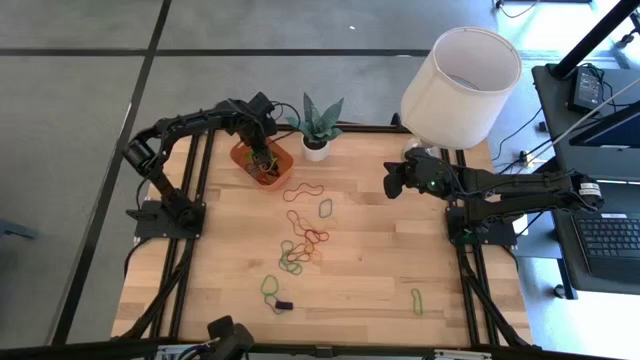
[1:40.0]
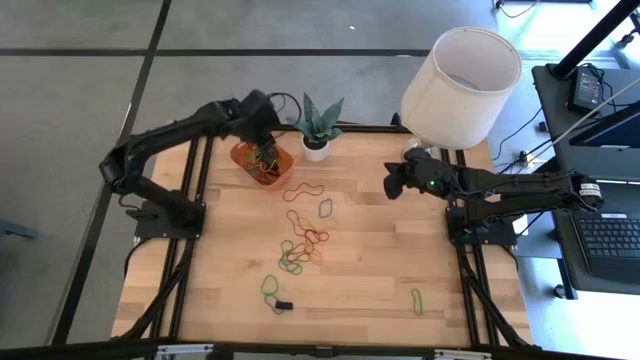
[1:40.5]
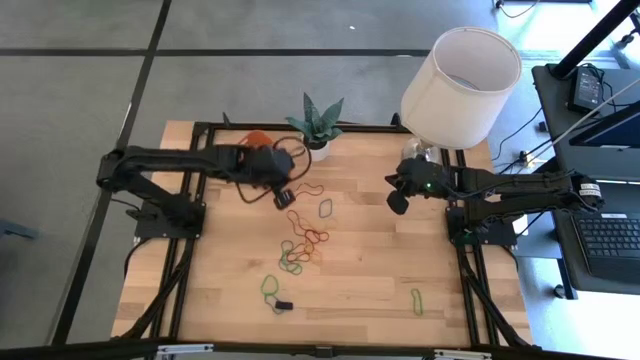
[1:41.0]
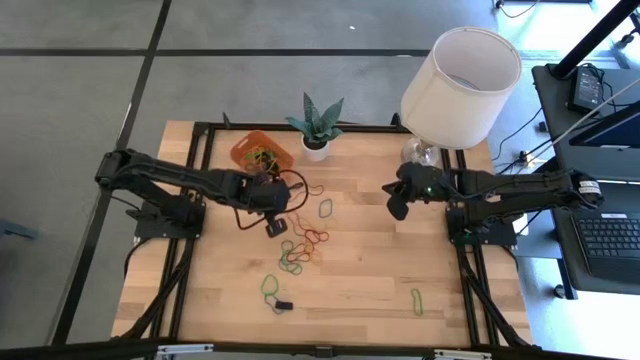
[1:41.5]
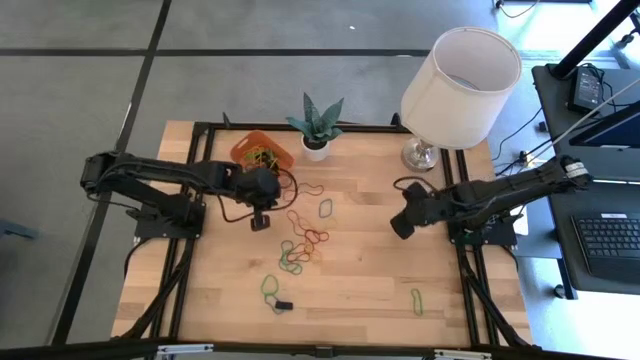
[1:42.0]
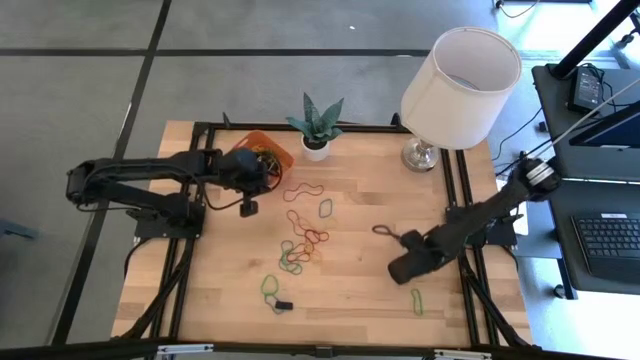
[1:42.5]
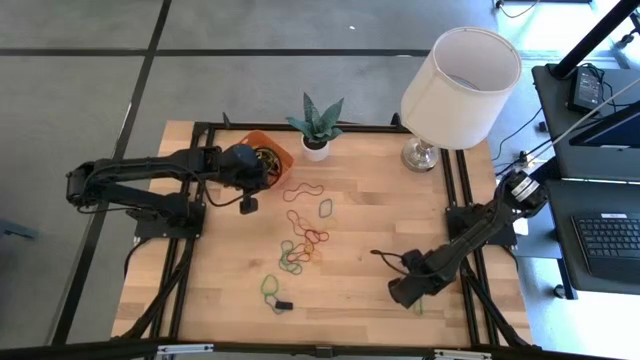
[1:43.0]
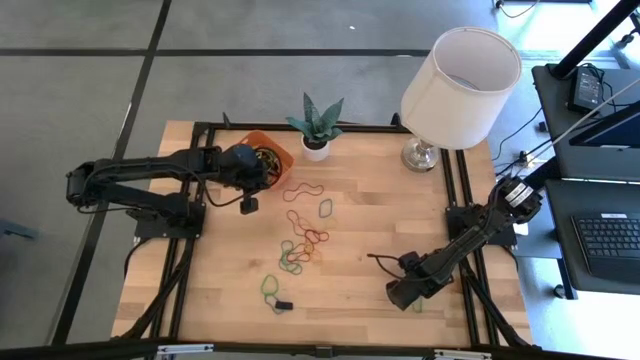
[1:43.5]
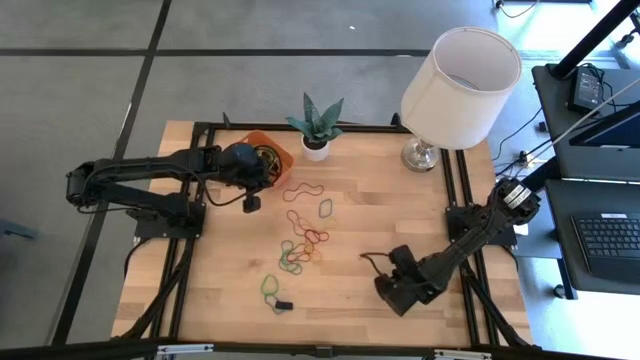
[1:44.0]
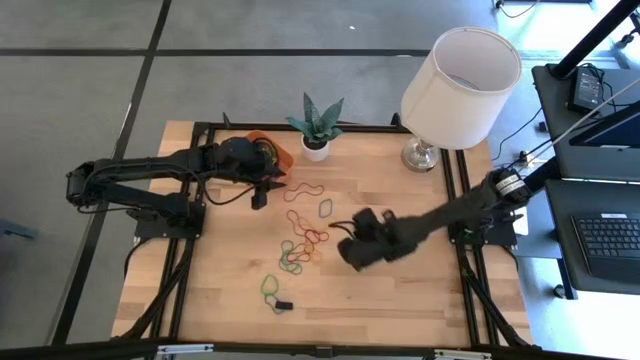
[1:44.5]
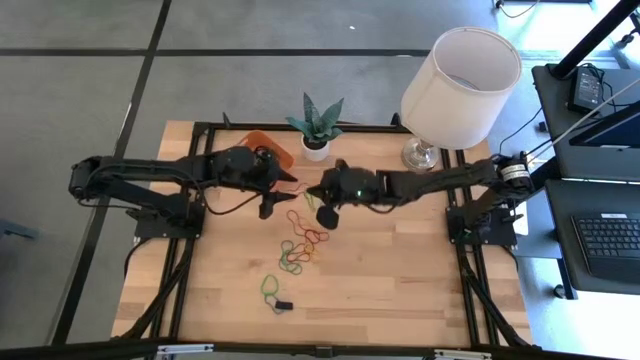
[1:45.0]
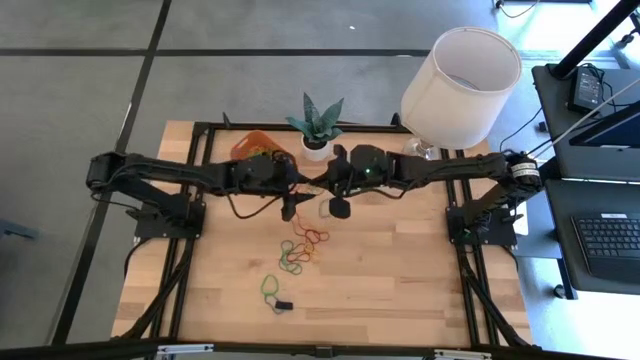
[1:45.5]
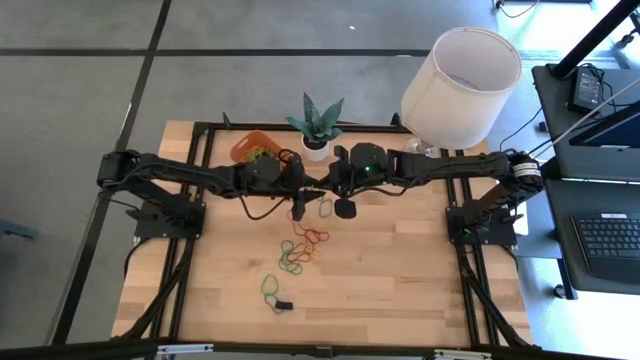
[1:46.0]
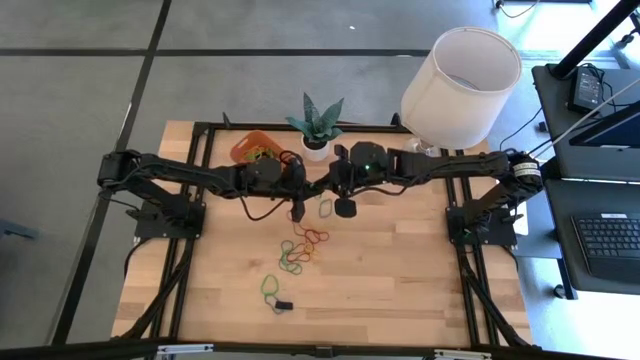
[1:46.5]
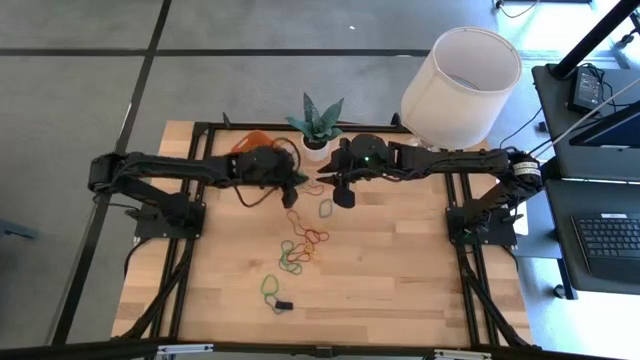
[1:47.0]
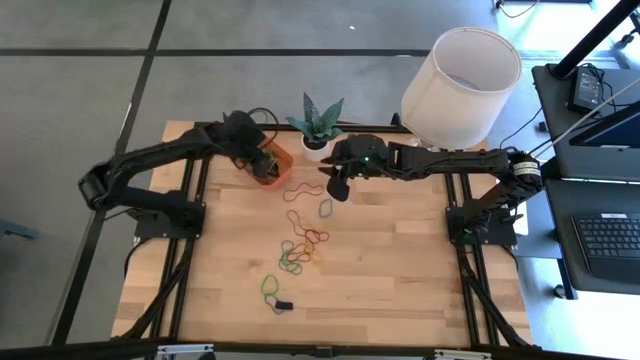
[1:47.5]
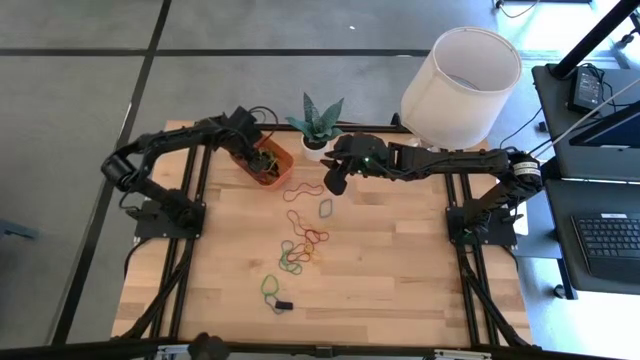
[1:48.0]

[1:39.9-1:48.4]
Task: Pick and place rubber bands into bin
Put the green rubber band into the orange bin

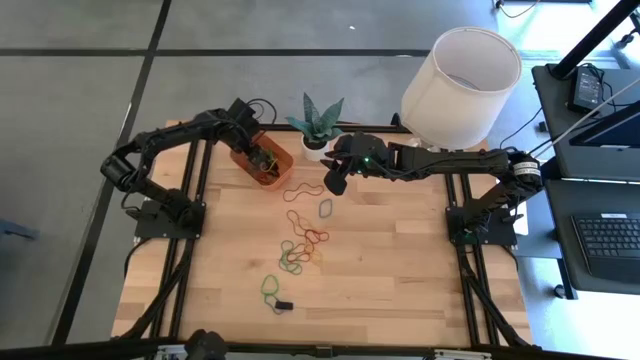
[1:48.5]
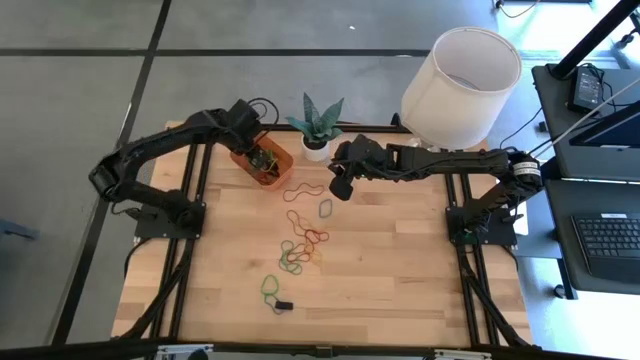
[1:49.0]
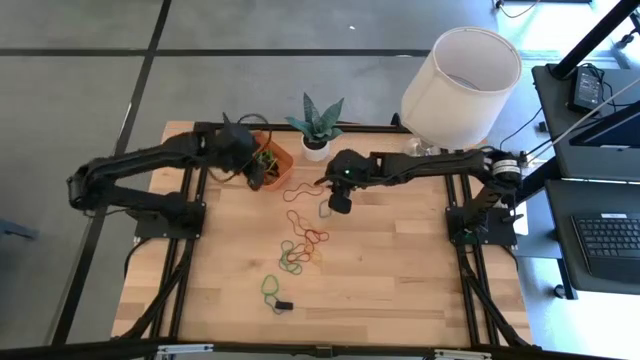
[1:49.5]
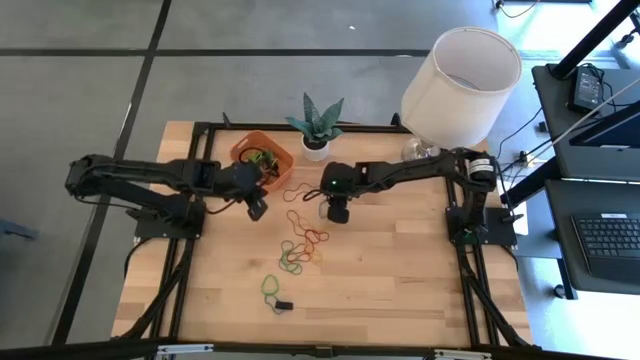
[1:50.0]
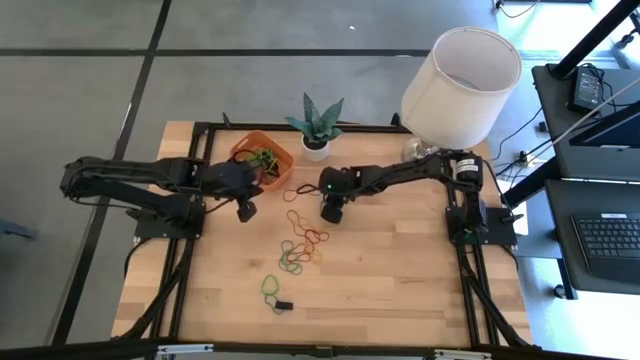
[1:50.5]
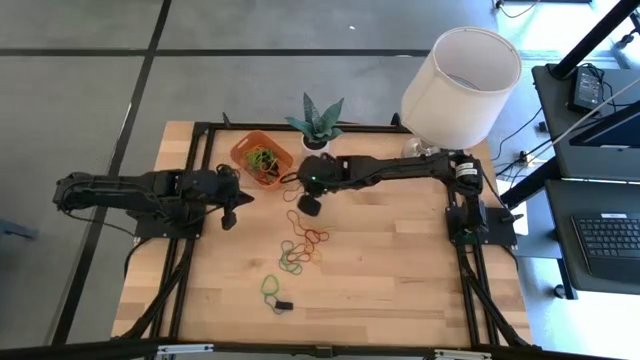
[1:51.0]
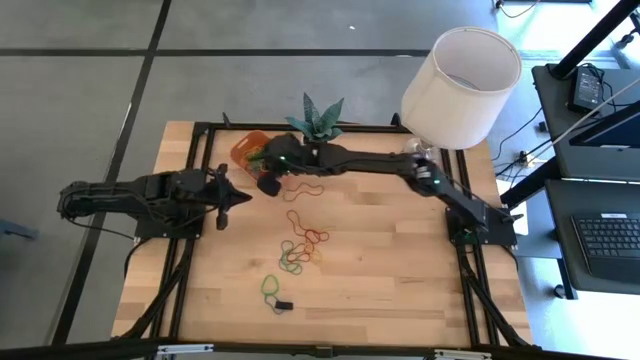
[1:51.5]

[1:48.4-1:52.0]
Put the blue rubber band into the orange bin

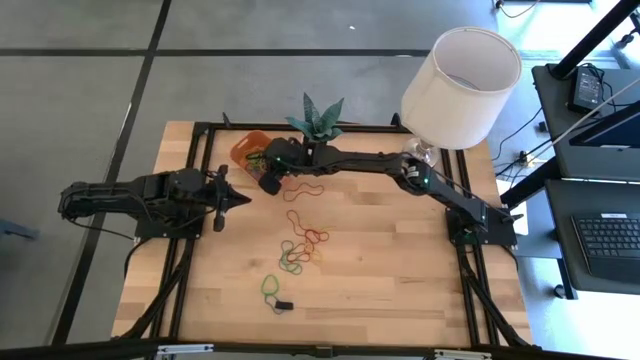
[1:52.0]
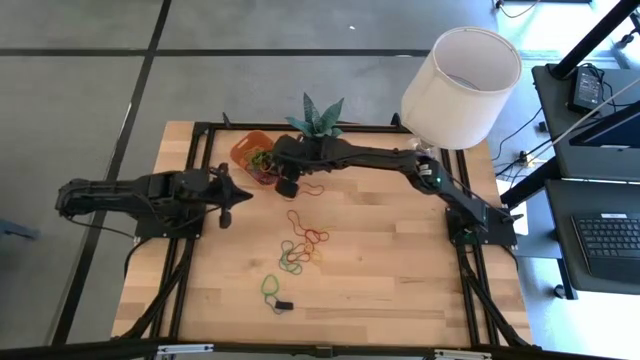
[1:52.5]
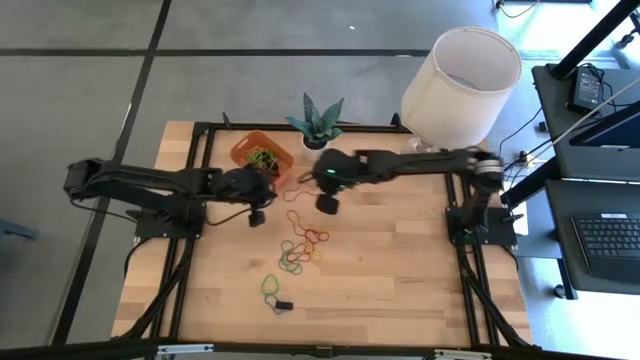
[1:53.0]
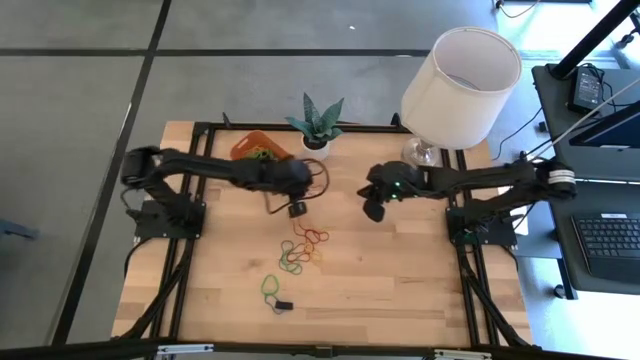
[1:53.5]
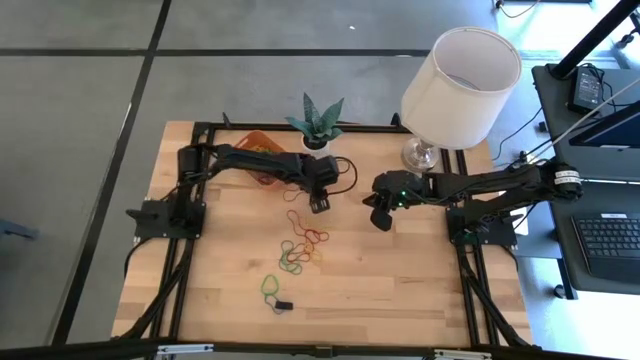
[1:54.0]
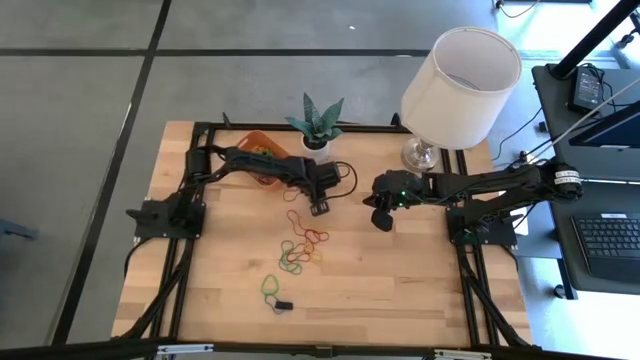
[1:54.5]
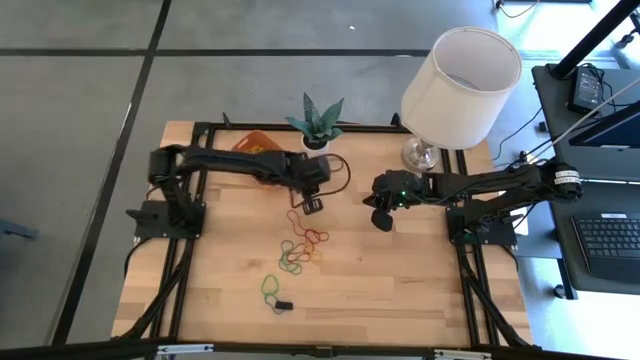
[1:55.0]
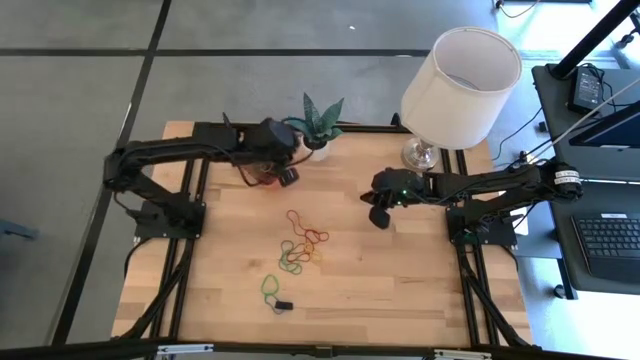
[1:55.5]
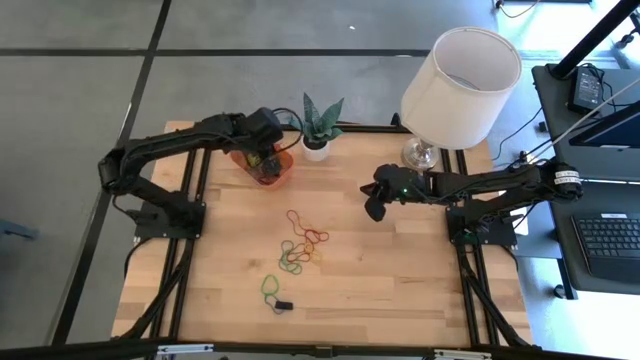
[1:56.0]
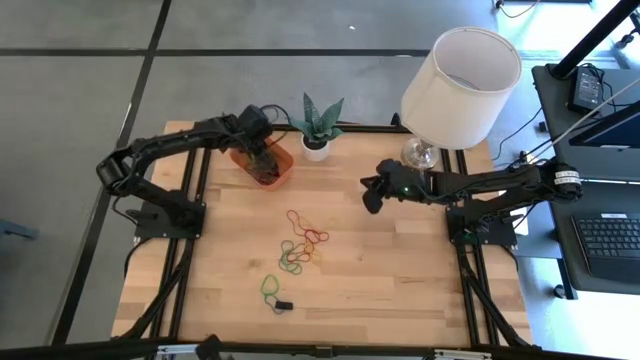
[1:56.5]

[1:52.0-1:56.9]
Put the red rubber band into the orange bin

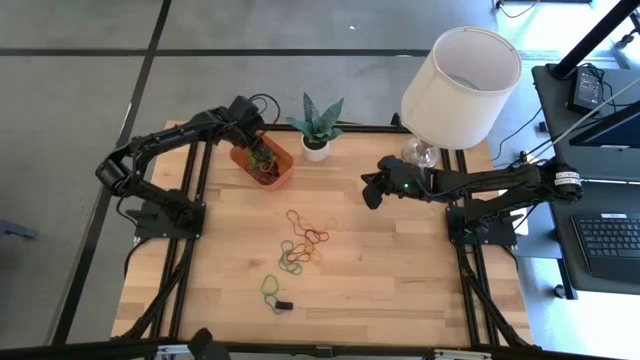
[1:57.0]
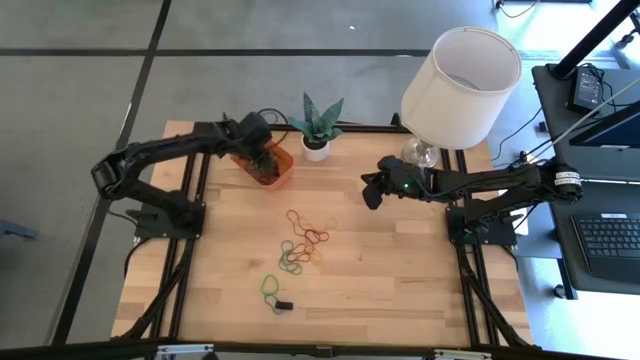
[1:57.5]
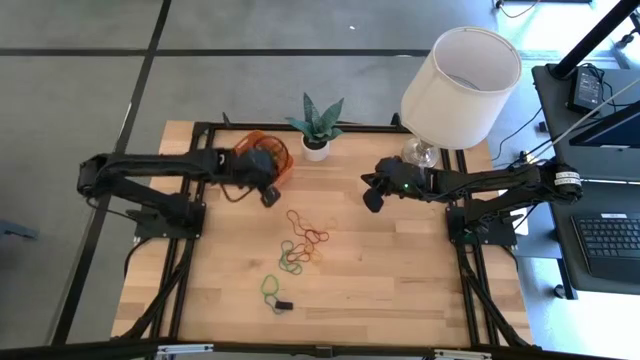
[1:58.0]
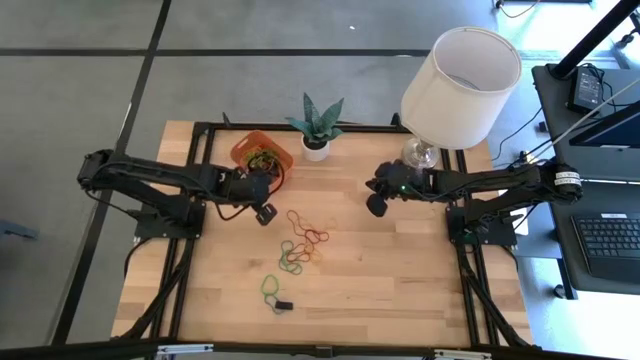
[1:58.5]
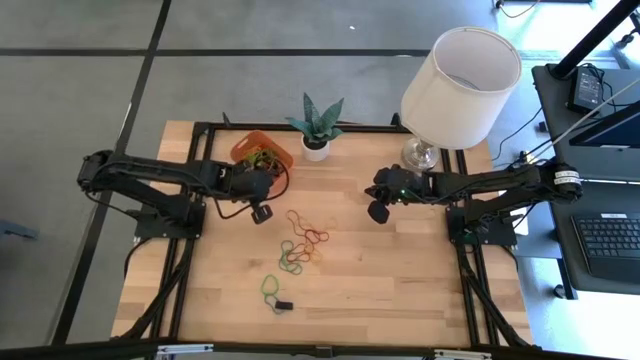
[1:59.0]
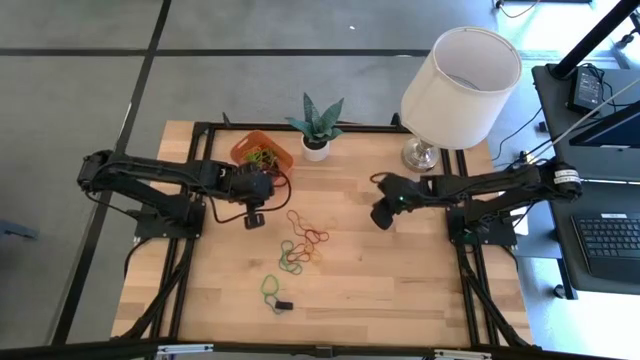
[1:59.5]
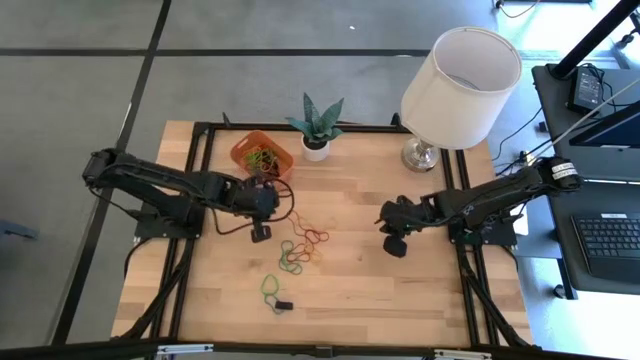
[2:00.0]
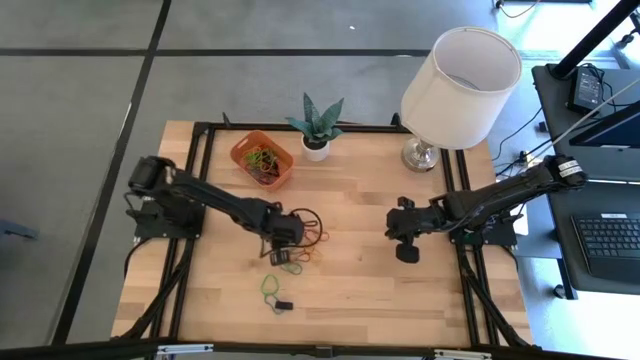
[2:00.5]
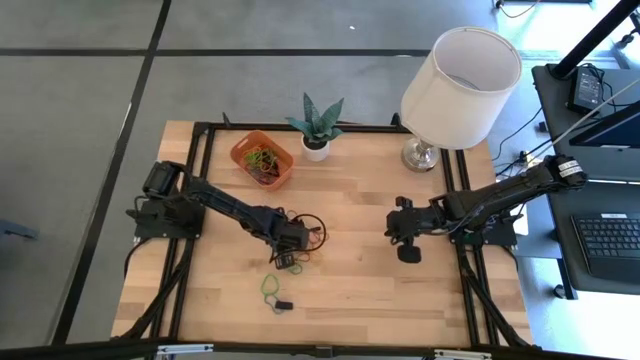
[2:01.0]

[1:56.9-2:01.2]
Put the blue rubber band into the orange bin
